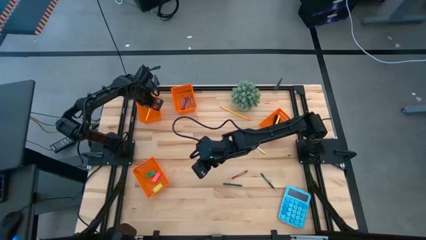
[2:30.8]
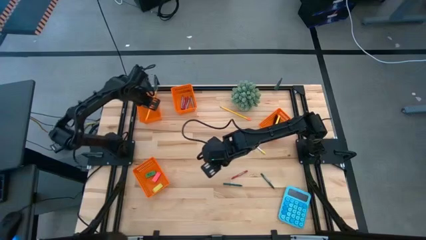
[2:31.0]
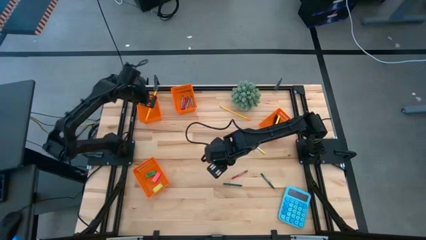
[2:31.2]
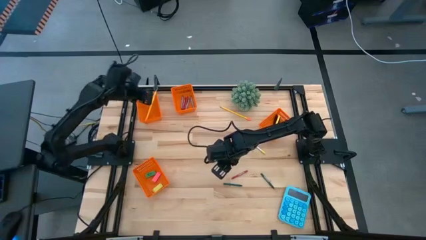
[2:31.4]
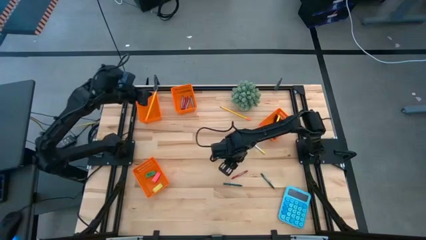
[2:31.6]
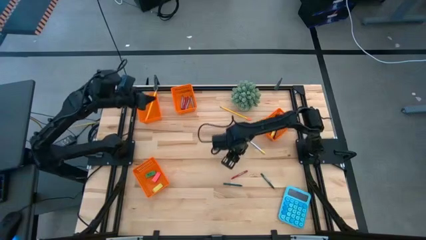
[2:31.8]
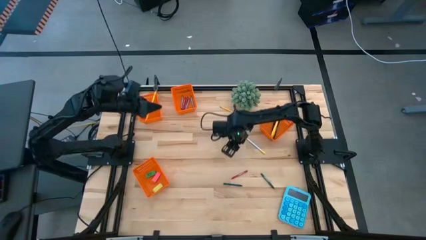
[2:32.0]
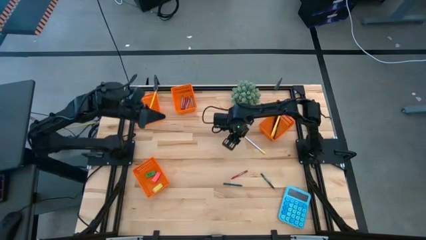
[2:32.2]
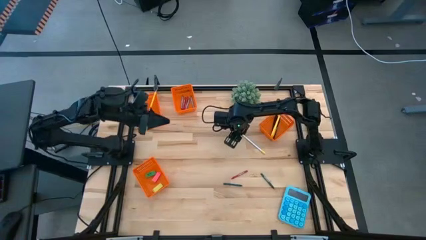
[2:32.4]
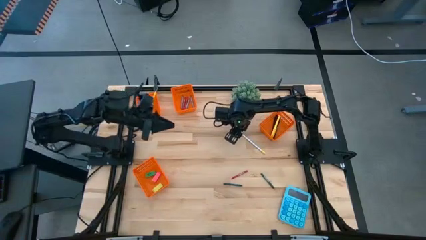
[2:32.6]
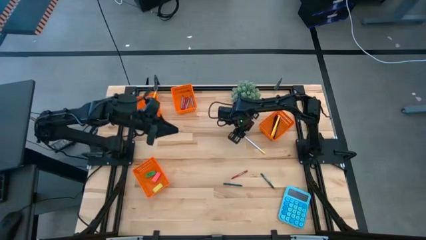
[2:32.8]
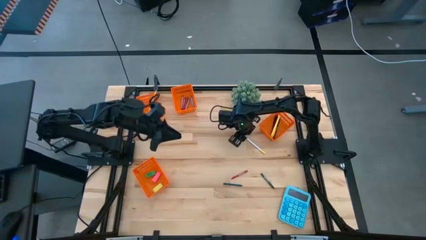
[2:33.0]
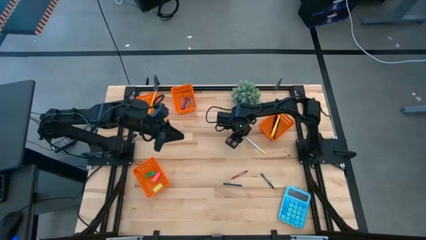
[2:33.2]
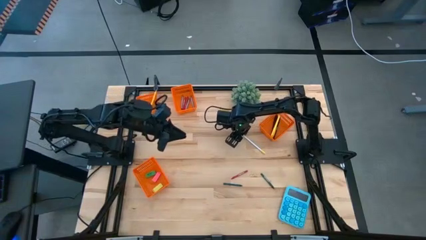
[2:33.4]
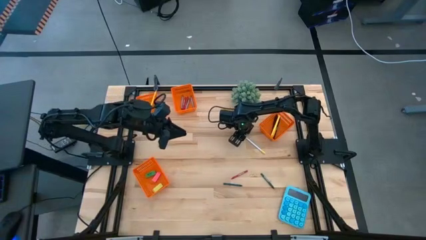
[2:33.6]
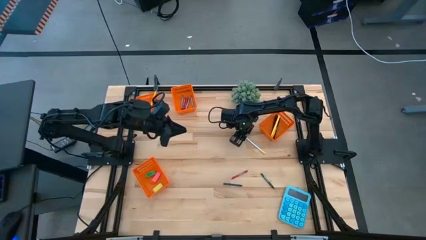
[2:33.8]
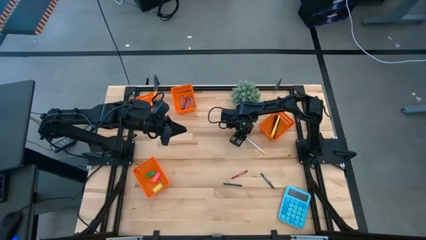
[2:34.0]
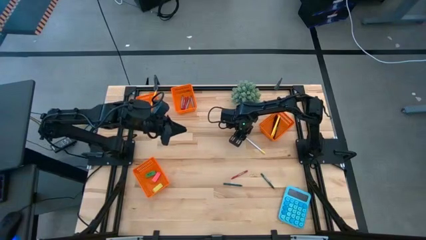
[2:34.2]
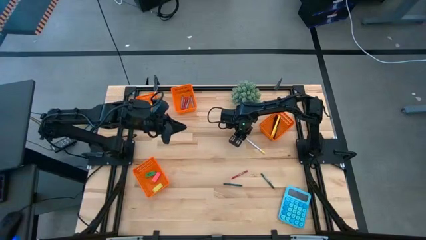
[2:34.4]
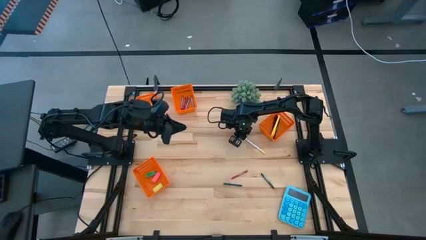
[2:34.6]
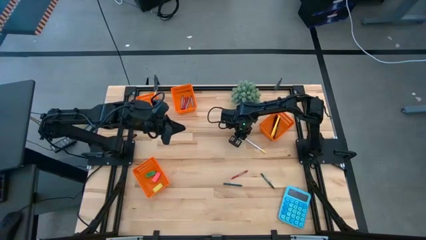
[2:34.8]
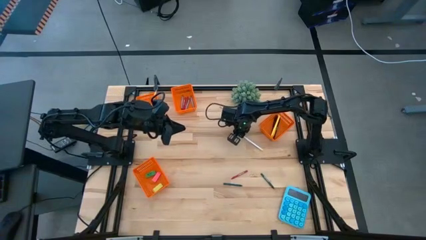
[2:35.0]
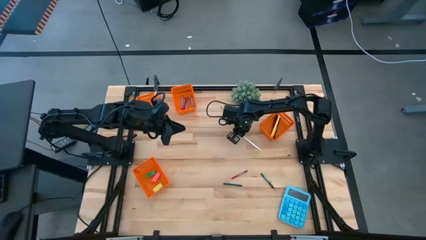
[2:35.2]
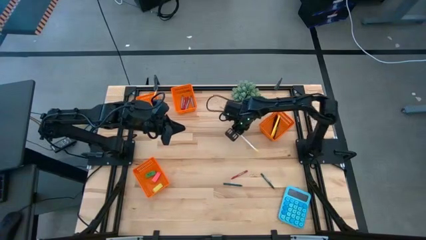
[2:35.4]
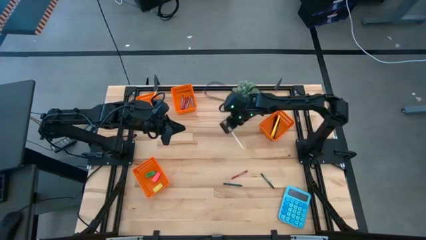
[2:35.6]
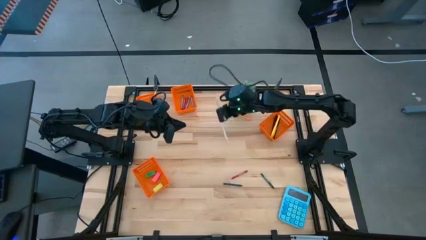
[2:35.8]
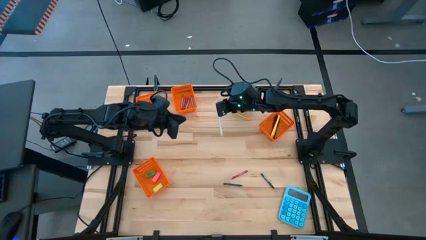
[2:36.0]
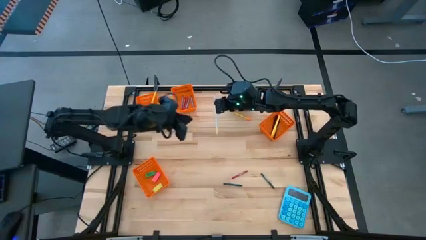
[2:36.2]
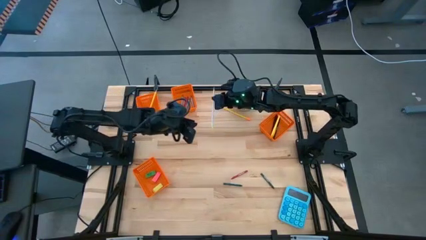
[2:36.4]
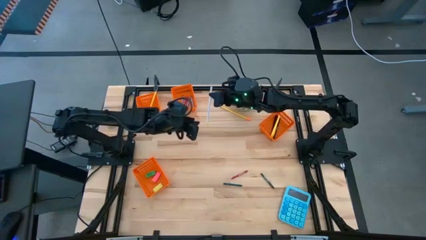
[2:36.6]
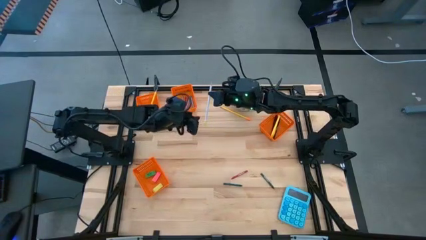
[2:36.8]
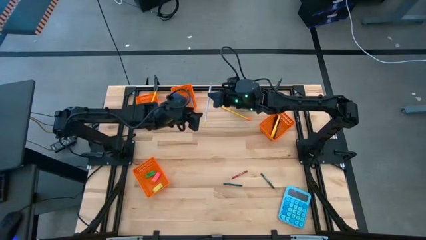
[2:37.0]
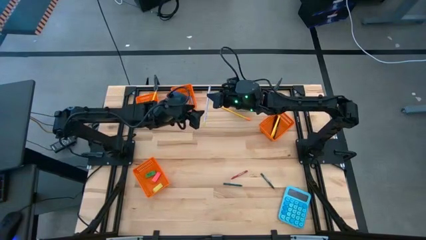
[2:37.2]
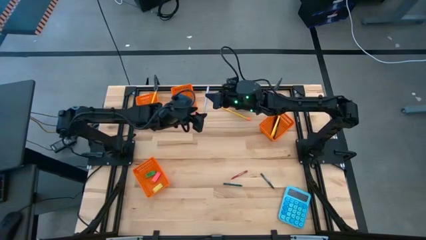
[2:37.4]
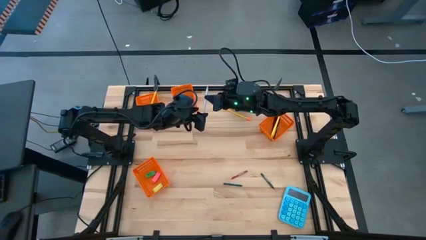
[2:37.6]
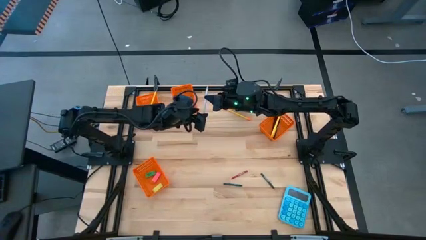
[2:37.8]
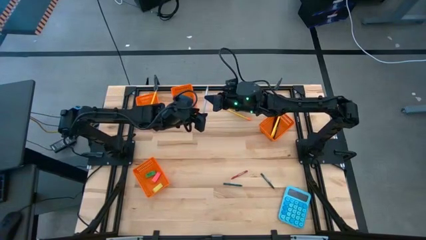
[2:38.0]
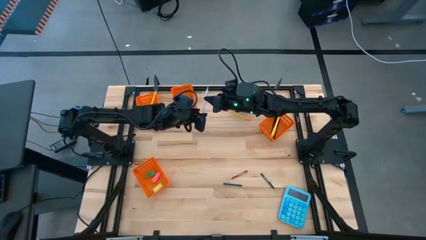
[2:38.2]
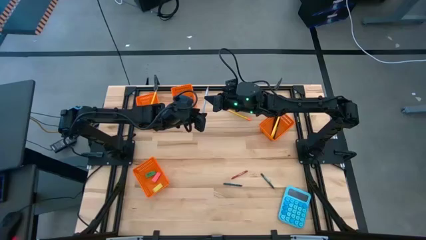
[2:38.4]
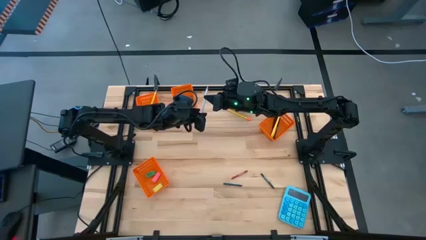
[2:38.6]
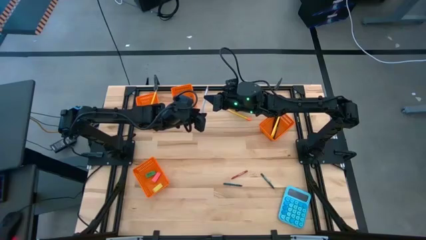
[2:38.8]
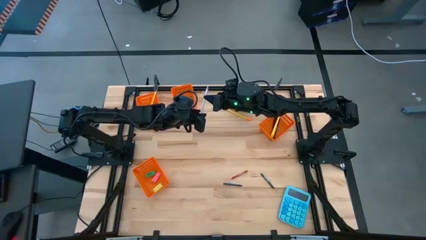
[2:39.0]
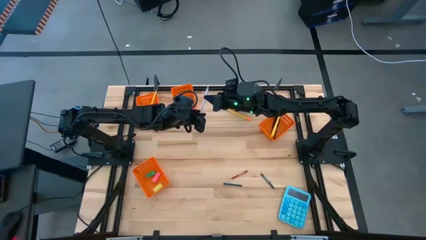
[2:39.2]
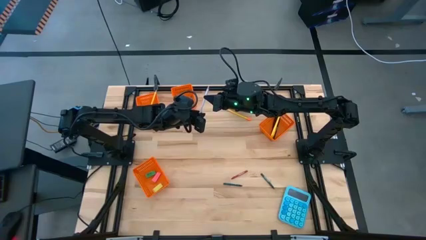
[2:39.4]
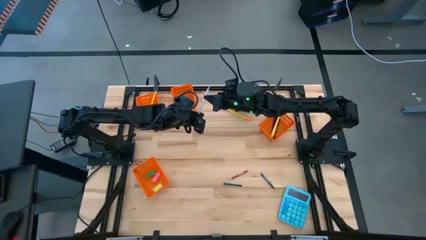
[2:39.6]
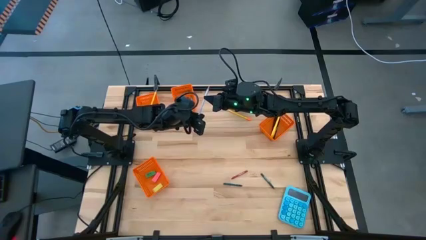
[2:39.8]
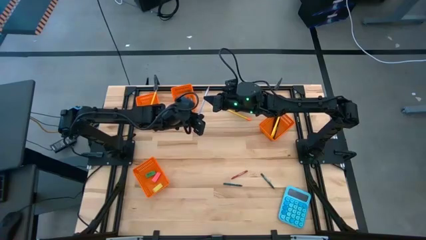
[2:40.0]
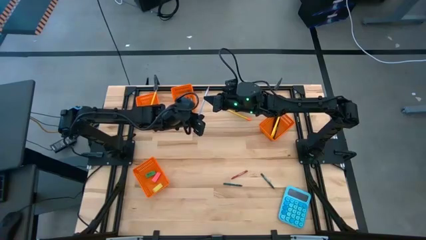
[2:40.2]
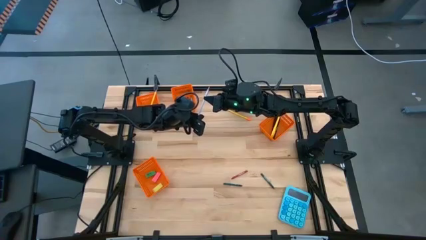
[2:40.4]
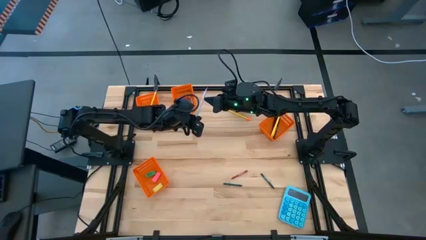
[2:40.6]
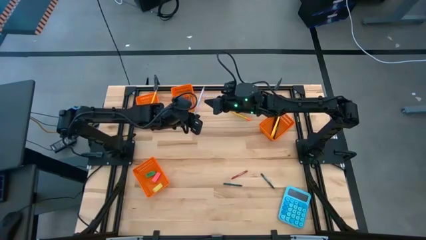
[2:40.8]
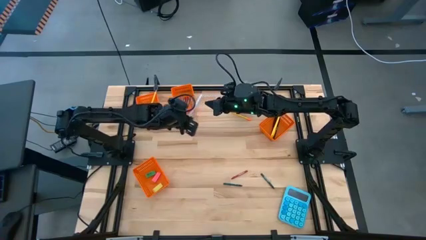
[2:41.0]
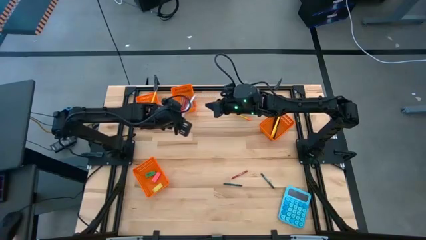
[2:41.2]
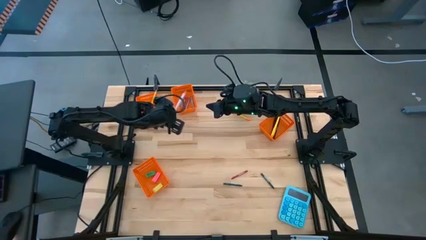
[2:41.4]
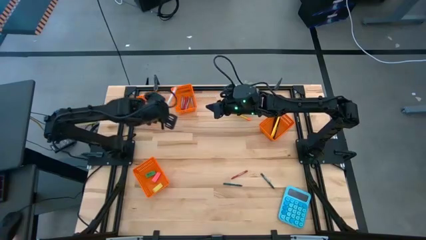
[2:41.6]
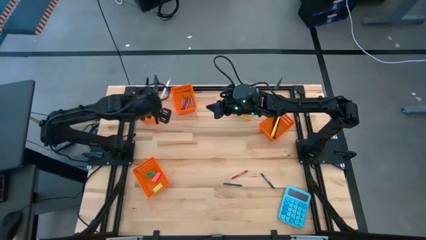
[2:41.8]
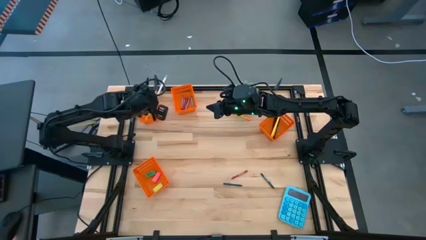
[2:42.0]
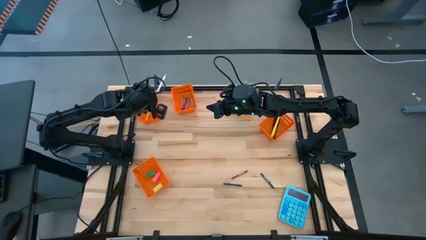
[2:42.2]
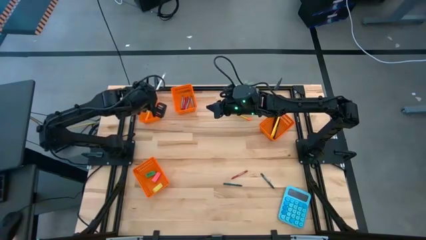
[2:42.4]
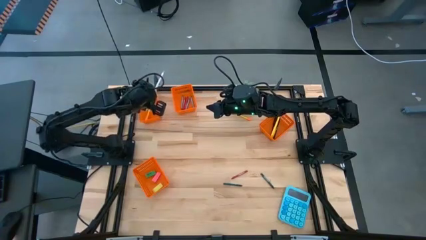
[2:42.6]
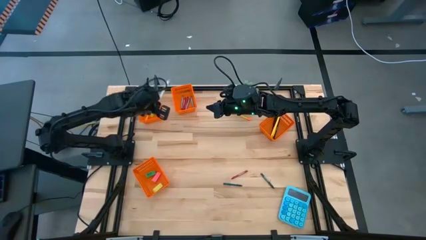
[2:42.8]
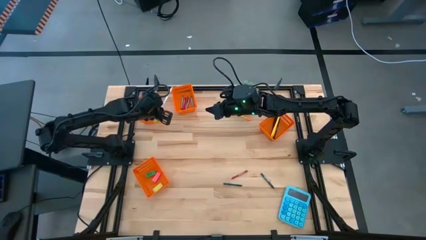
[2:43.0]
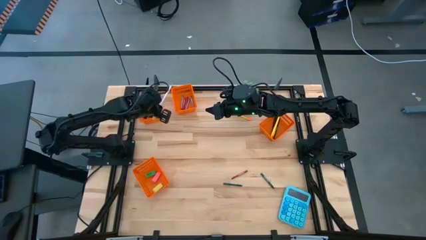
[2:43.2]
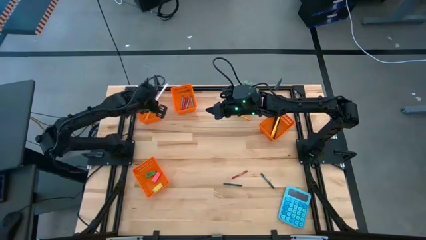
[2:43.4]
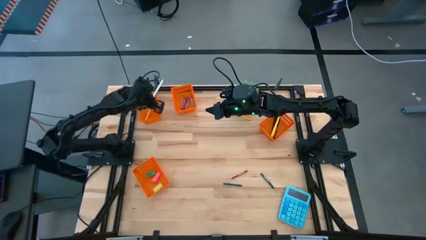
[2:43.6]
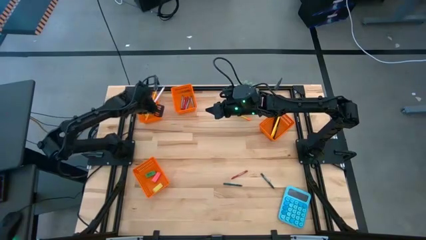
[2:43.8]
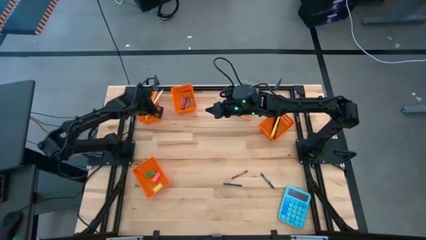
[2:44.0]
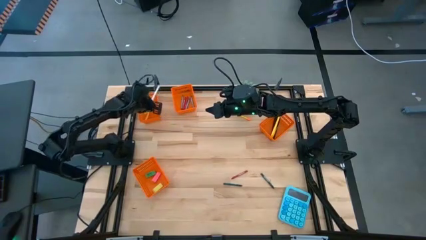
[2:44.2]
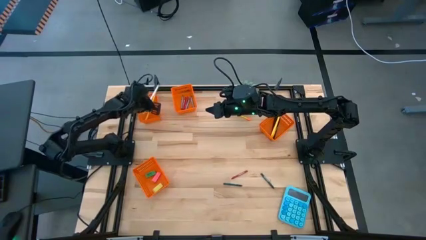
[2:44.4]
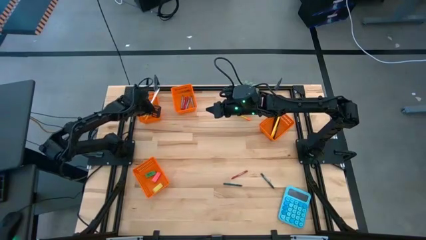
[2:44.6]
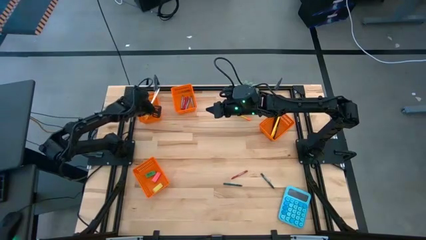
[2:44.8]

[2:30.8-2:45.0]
Task: Sort crayons/erasers/pens/pencils in bins
Put the white pencil into the top left orange bin
